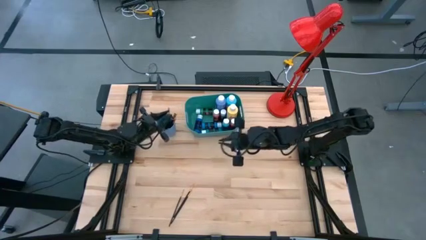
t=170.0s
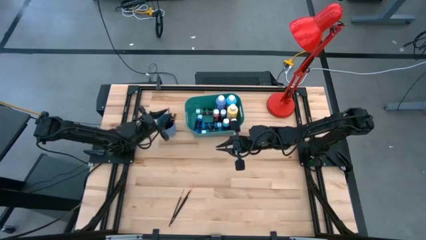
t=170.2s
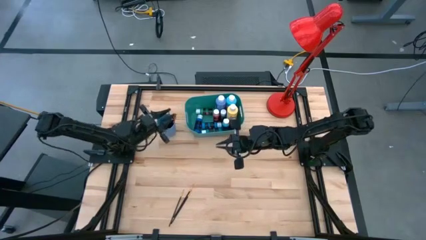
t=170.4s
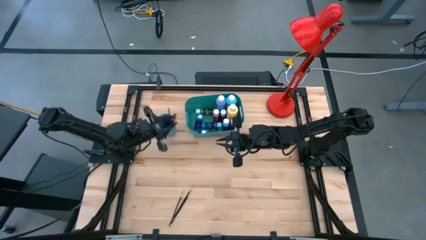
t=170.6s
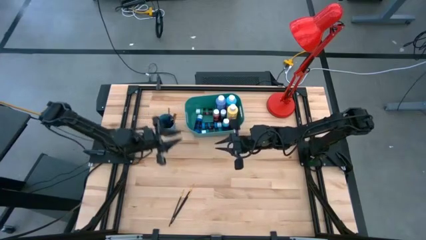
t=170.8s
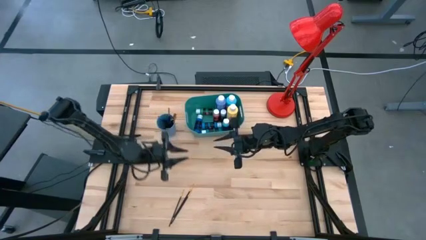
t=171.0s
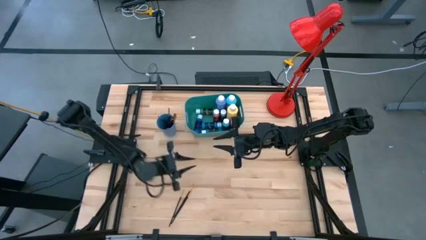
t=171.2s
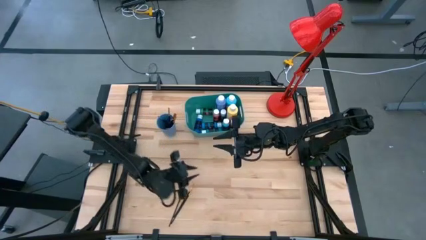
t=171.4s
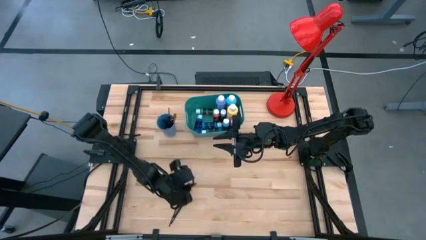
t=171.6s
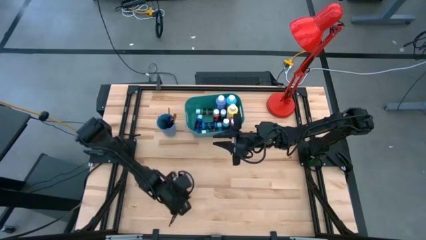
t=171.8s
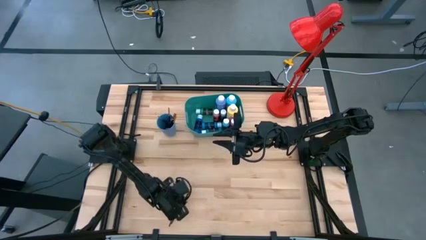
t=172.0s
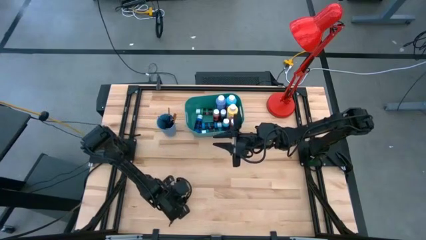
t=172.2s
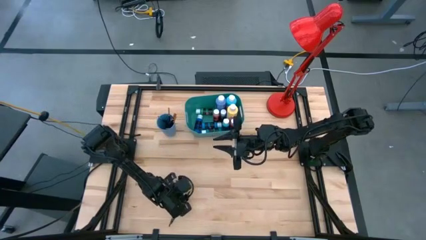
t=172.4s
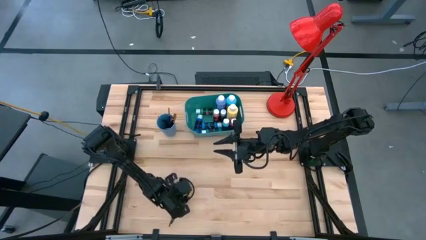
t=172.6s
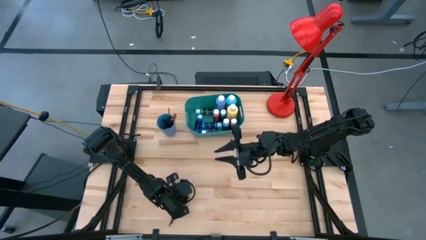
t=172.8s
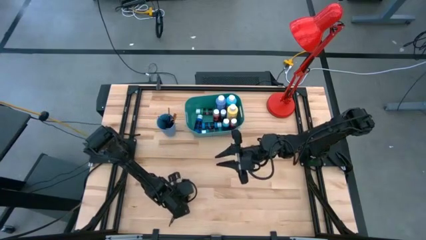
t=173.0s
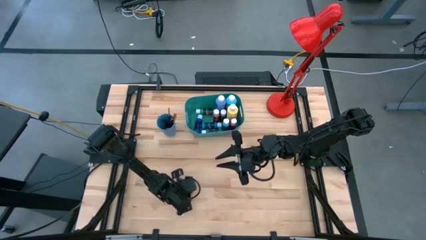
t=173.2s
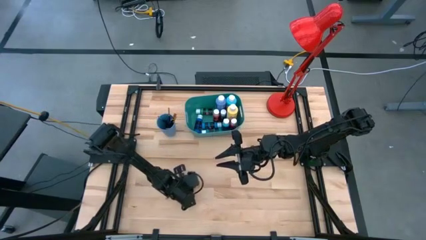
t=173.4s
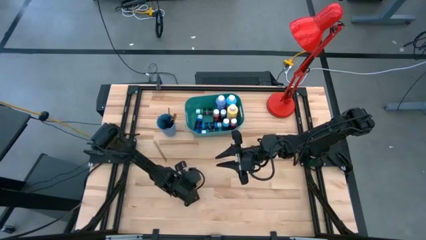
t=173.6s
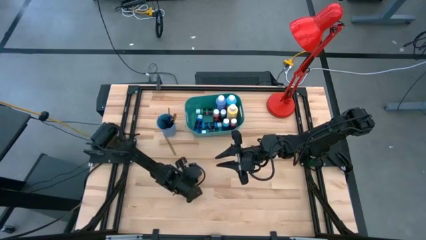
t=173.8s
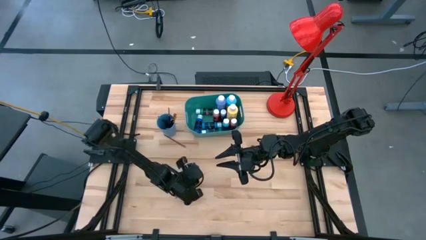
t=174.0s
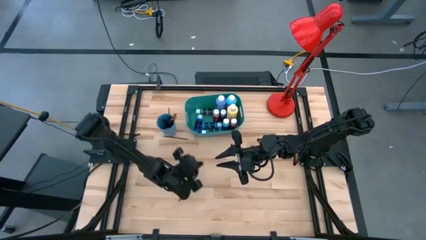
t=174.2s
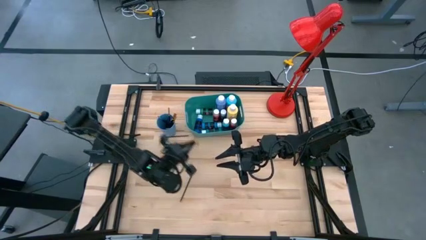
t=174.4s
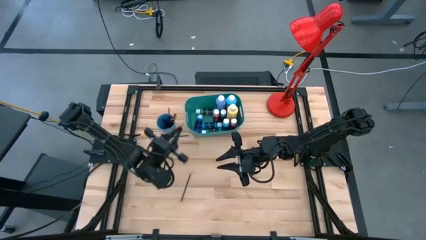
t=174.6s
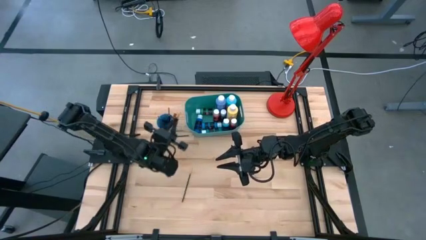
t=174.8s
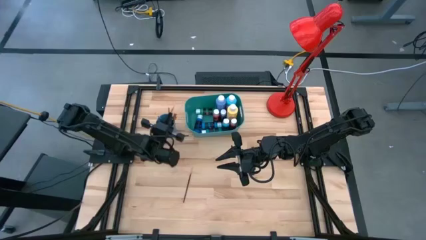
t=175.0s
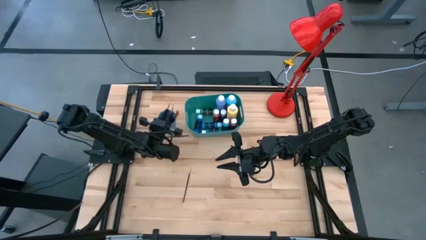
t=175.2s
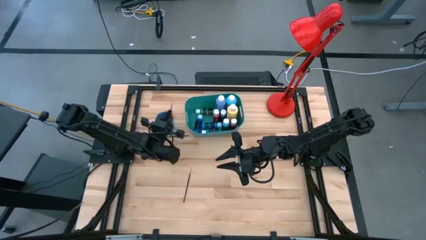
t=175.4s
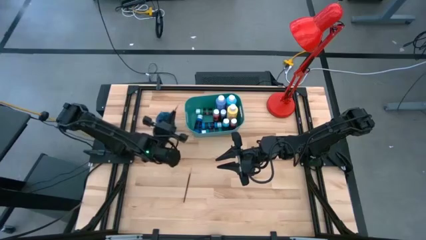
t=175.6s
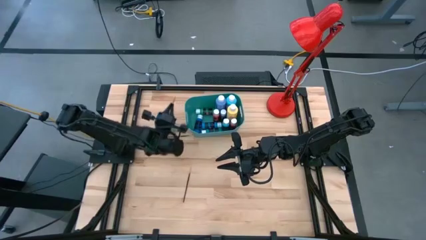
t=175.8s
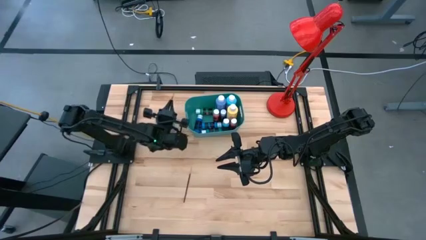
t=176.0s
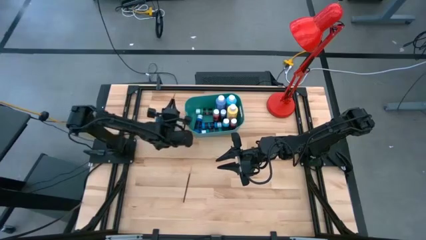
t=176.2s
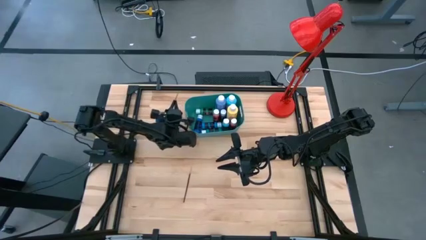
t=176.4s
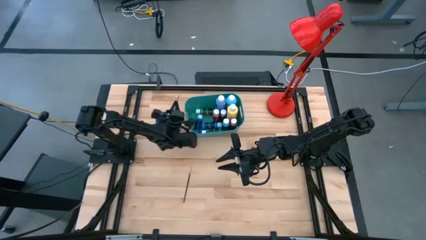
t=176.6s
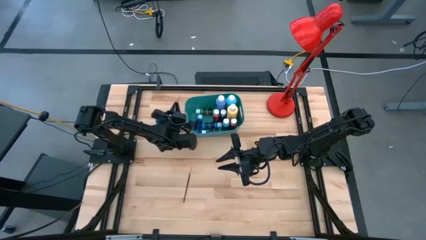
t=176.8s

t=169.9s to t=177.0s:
Task: Pick & Place Paint Supplies
Put the gold paint brush into the blue cup

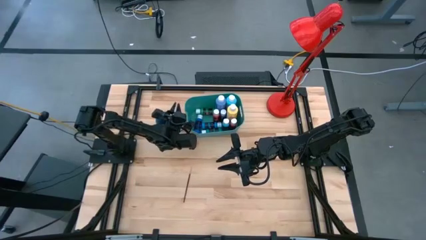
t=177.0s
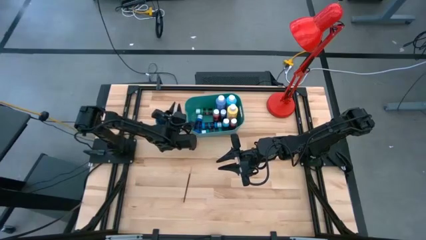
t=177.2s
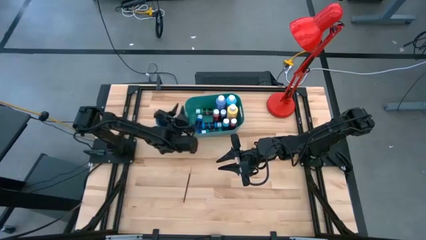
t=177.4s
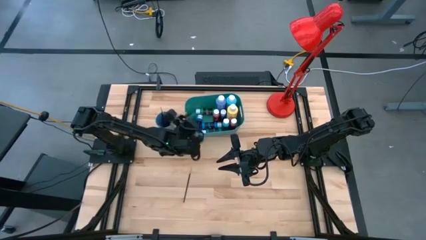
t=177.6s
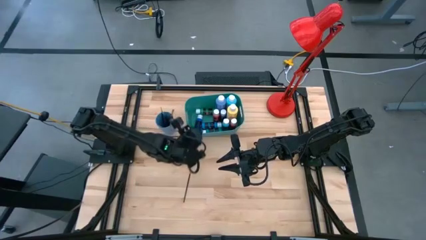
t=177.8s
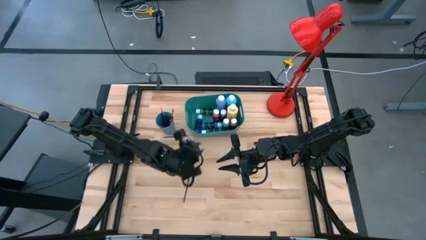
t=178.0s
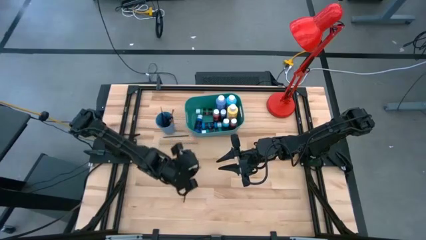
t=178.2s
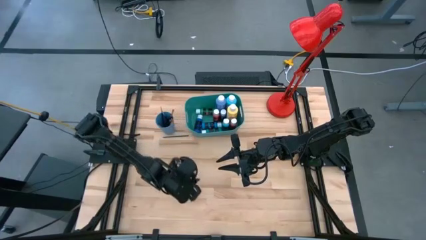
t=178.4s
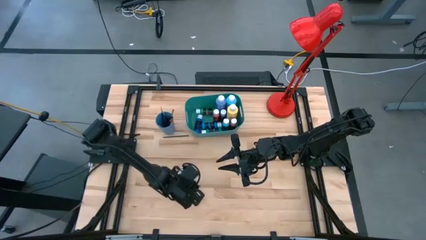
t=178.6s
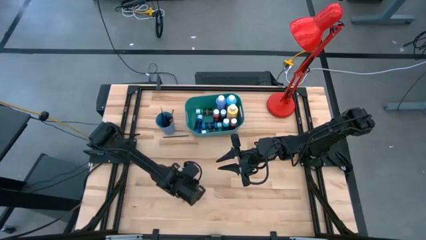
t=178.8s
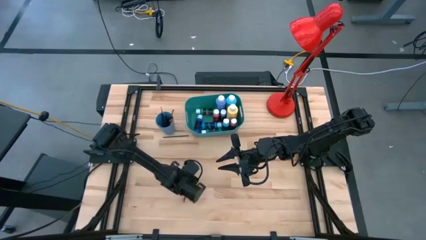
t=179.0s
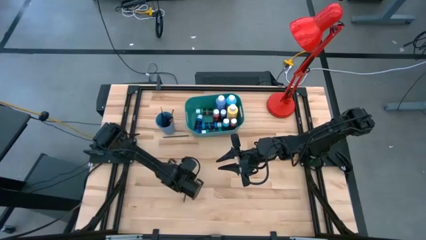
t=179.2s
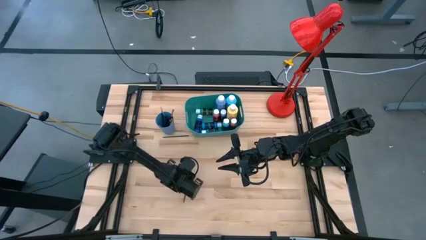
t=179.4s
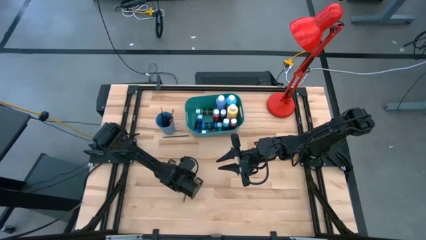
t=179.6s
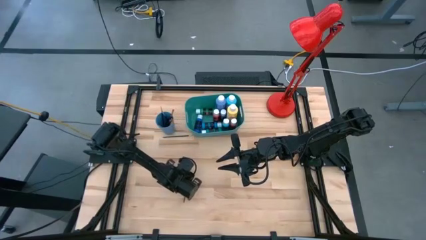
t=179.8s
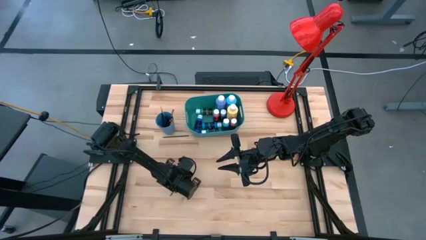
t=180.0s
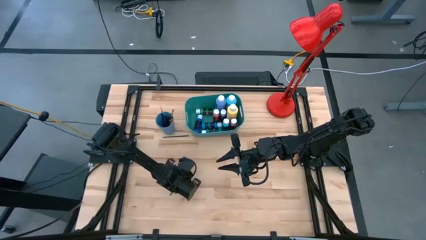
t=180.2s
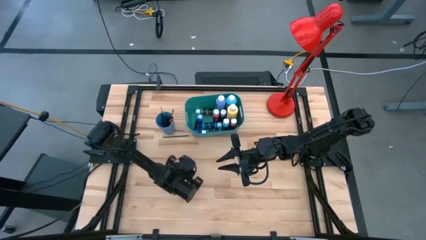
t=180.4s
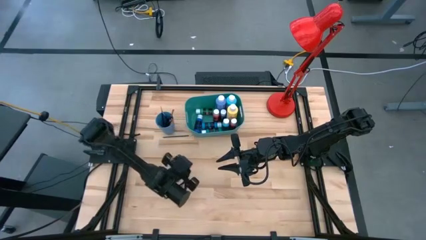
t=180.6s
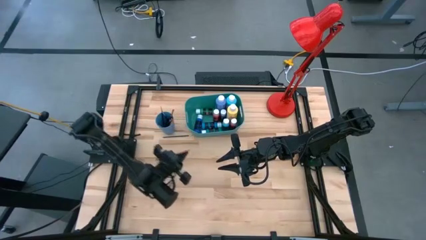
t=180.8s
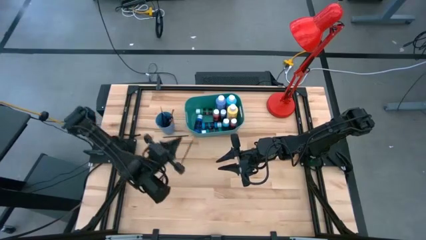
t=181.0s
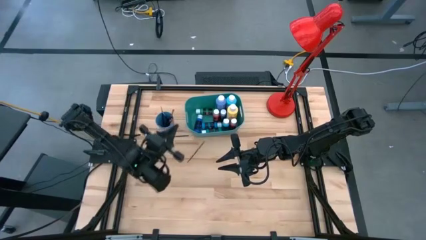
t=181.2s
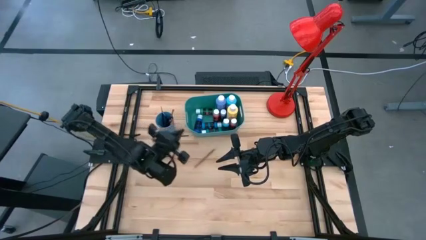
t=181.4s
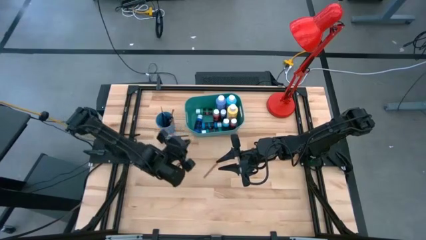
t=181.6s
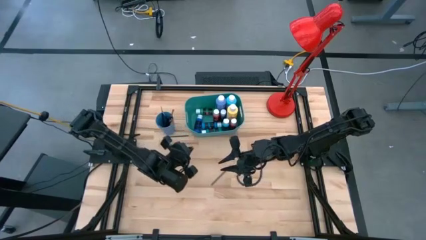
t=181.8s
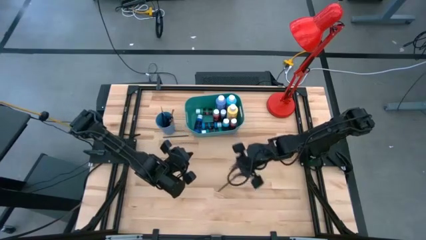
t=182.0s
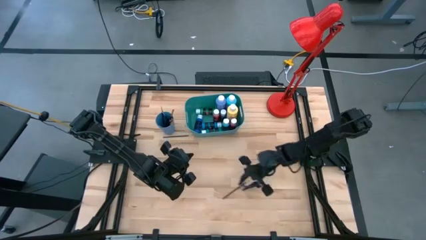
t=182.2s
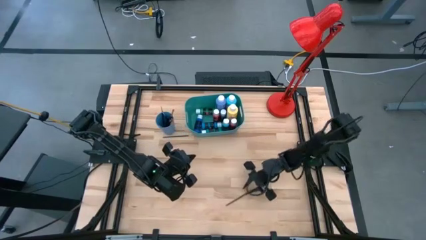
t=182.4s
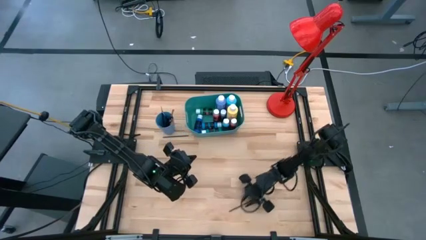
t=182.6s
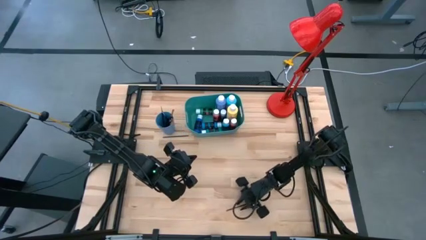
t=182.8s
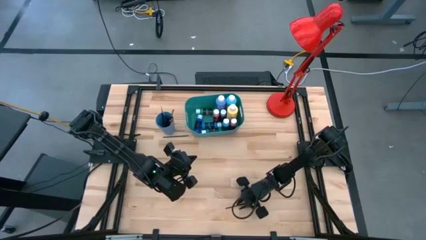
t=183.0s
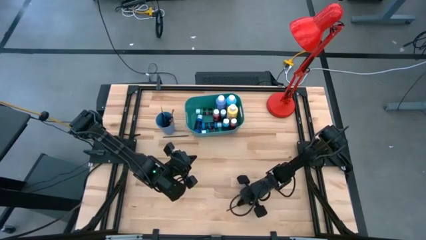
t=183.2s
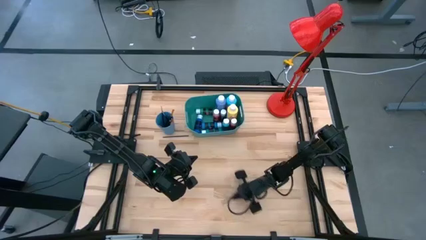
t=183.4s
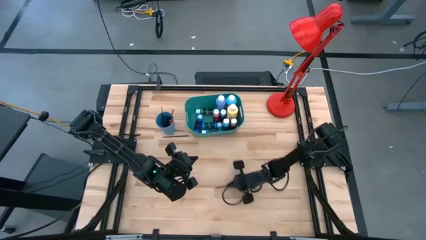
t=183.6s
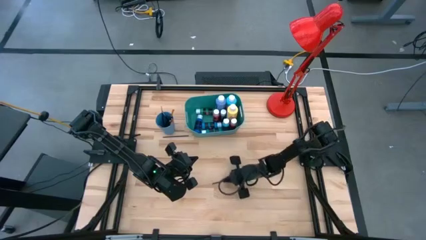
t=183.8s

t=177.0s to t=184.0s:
Put the gold paint brush into the blue cup

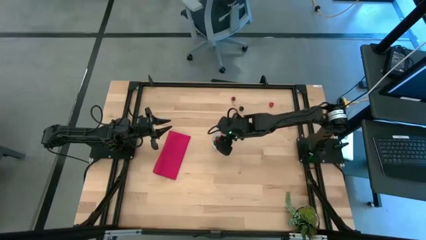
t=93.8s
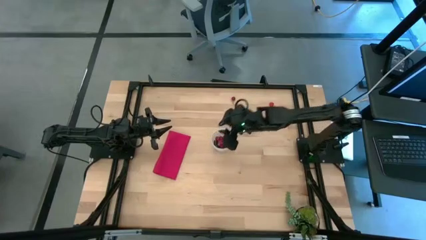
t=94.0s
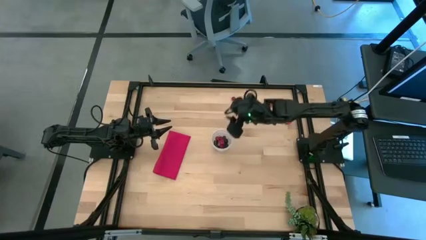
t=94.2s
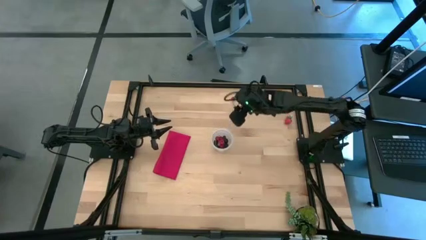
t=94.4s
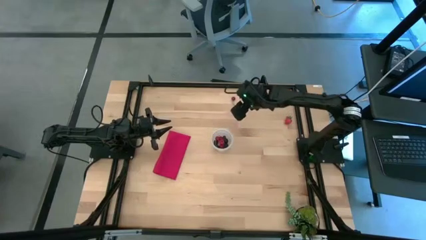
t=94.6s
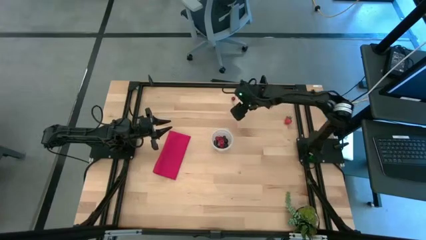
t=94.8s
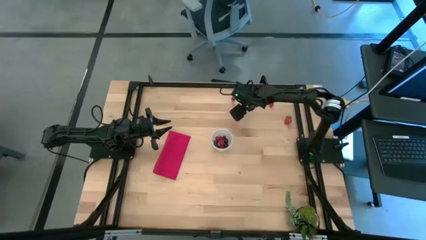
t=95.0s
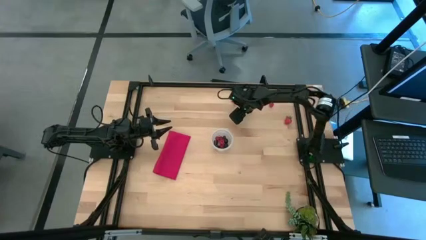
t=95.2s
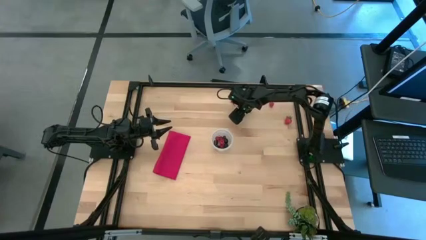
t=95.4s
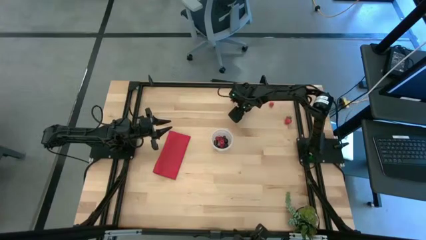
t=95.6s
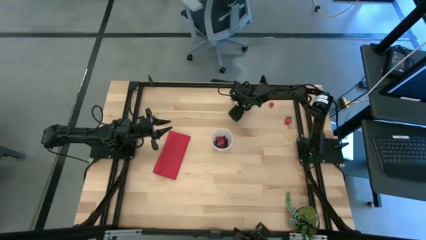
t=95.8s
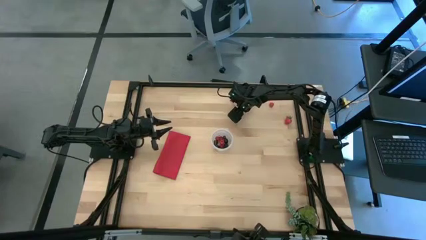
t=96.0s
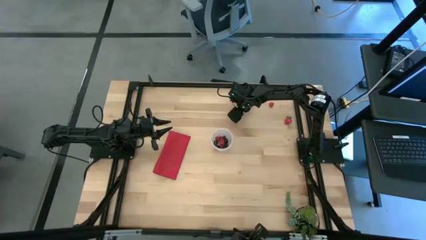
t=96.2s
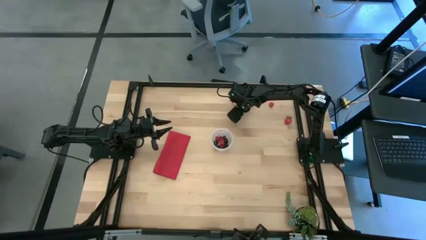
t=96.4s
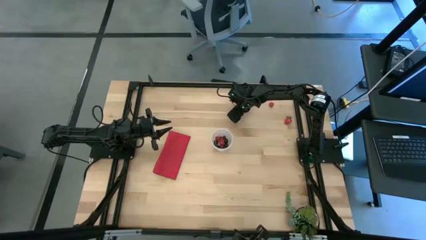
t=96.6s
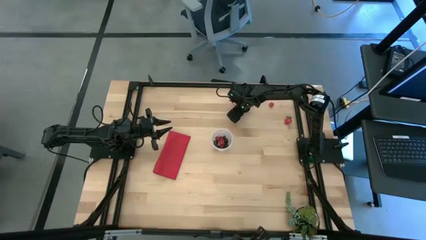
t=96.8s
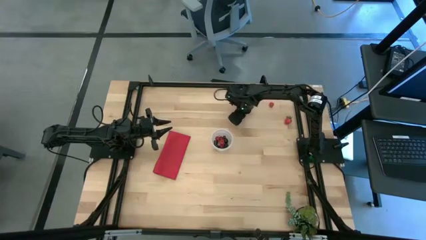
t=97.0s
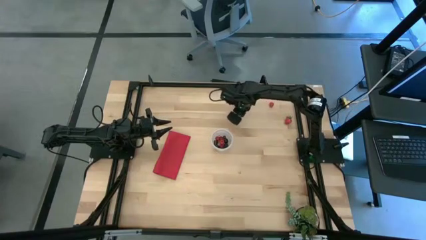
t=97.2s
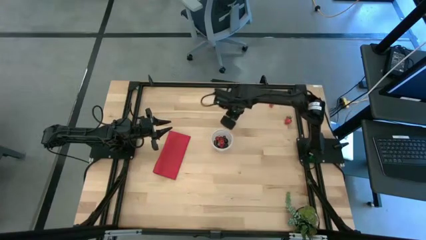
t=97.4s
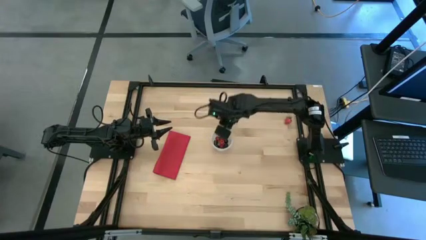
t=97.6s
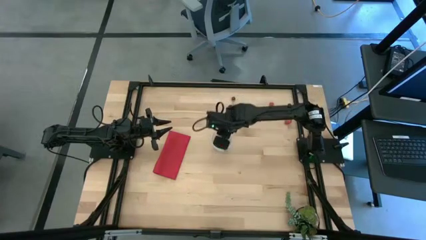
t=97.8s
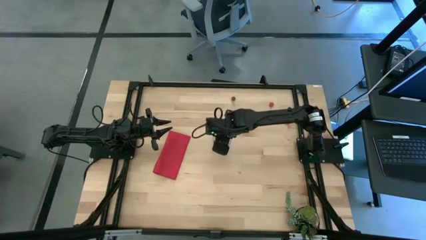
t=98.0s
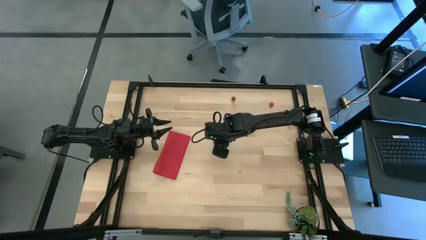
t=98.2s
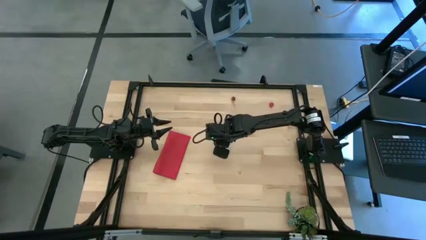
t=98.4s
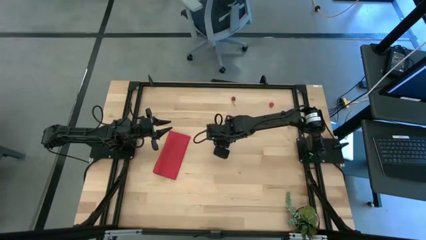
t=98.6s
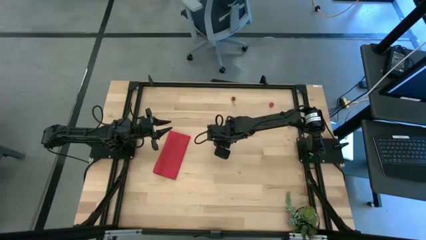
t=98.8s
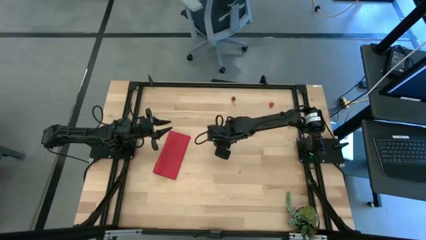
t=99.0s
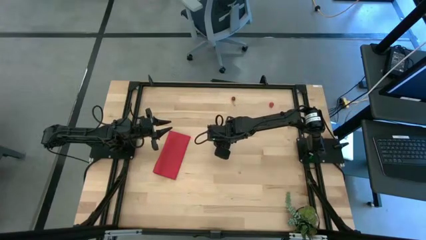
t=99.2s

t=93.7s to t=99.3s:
Task: Pick and placing Produce into tupperware
Put the black cherries into the transparent bin
